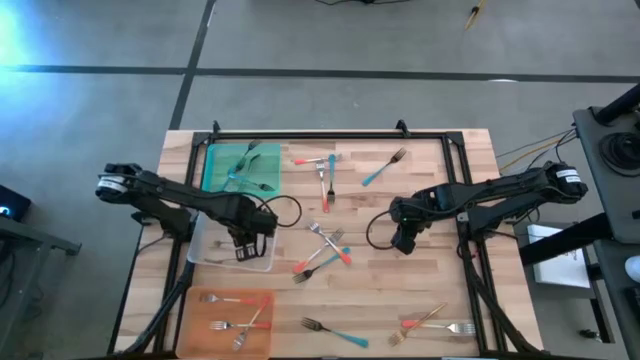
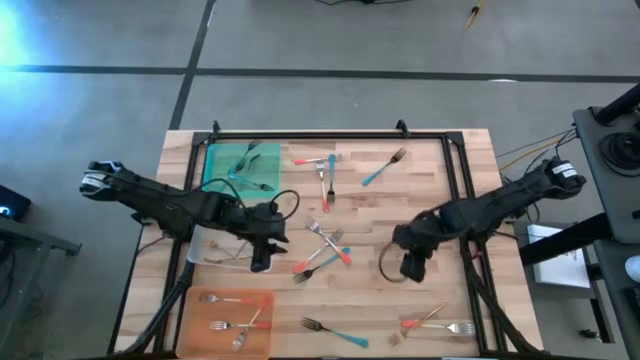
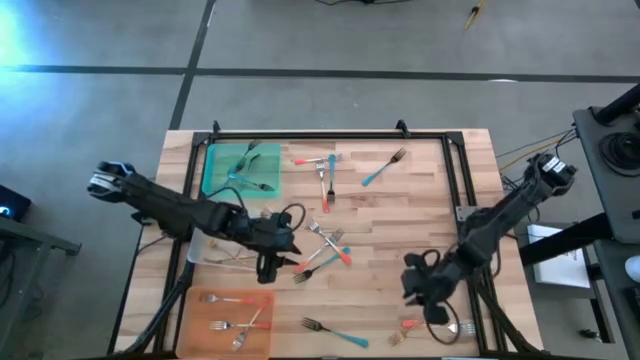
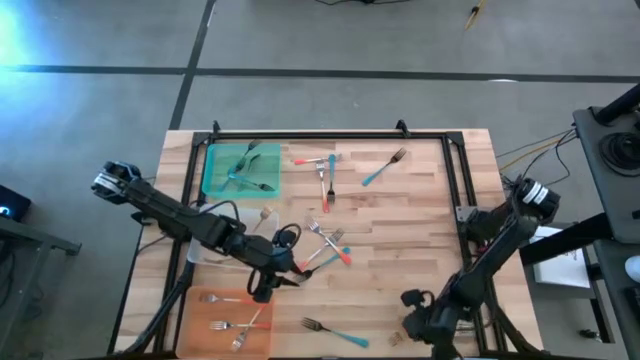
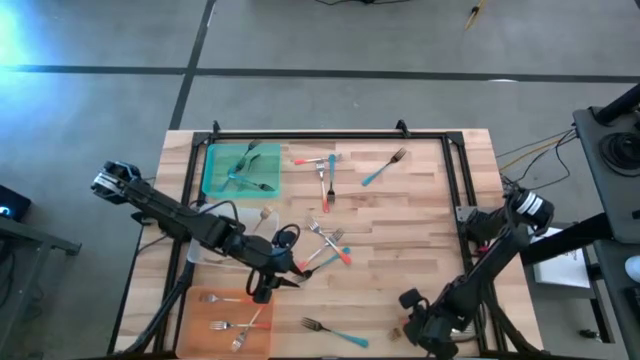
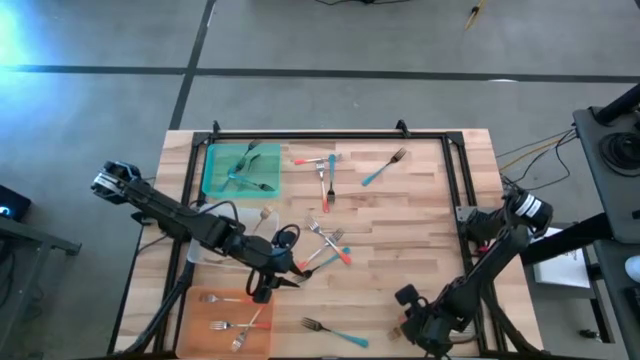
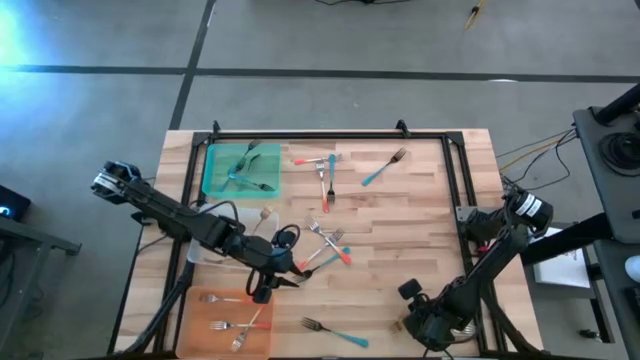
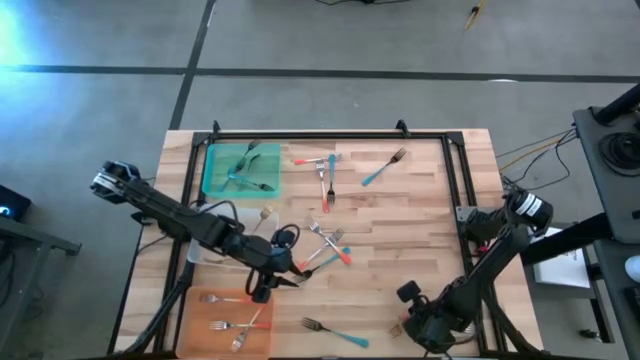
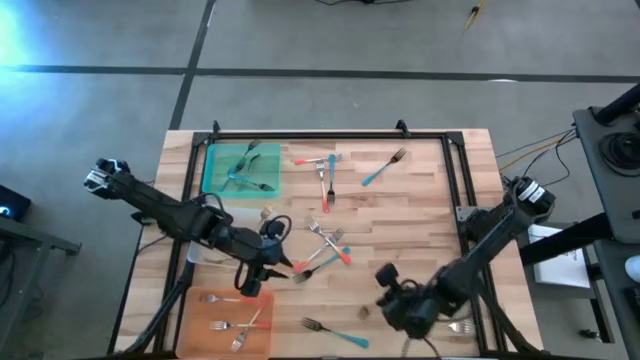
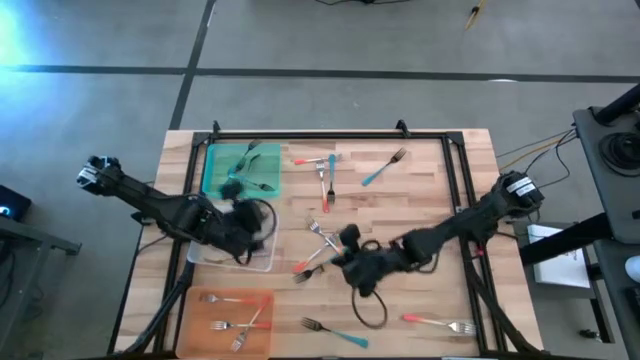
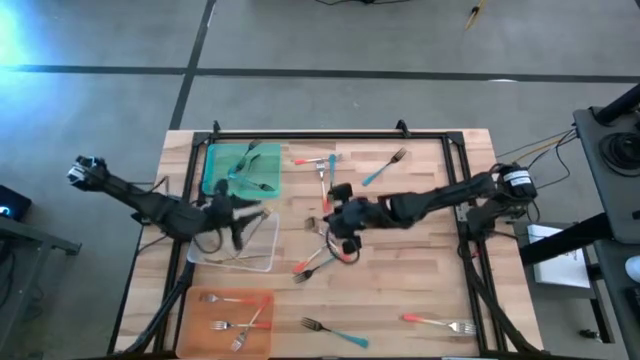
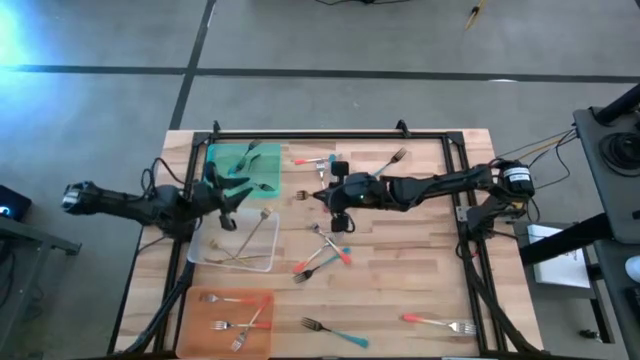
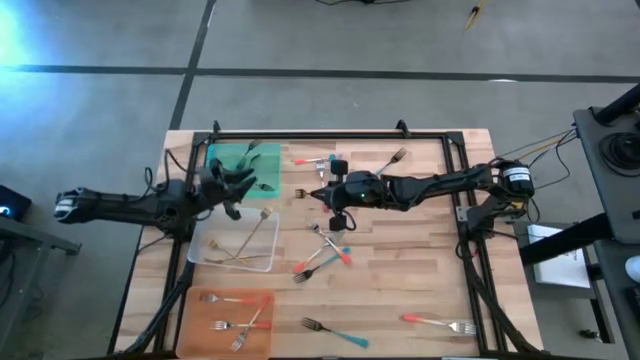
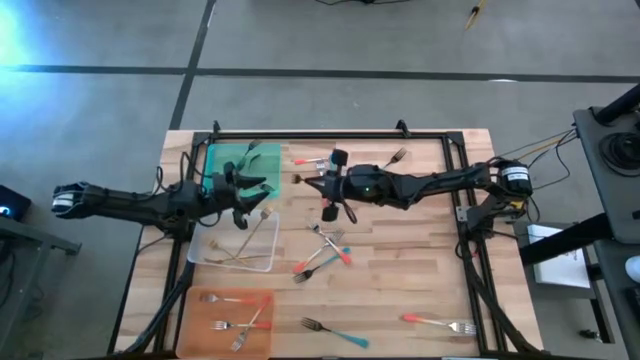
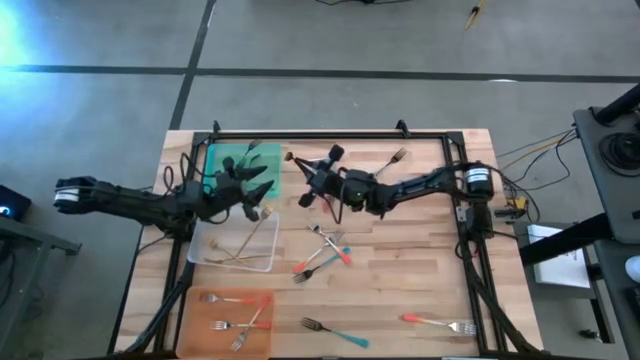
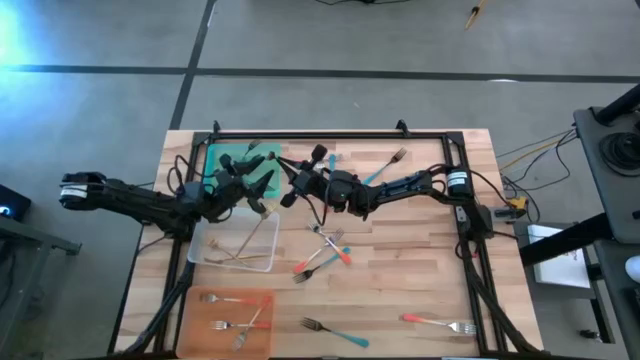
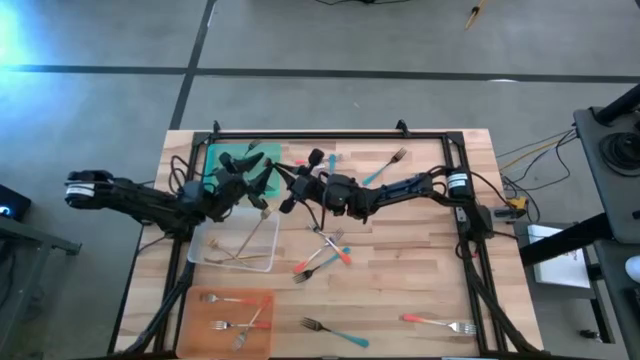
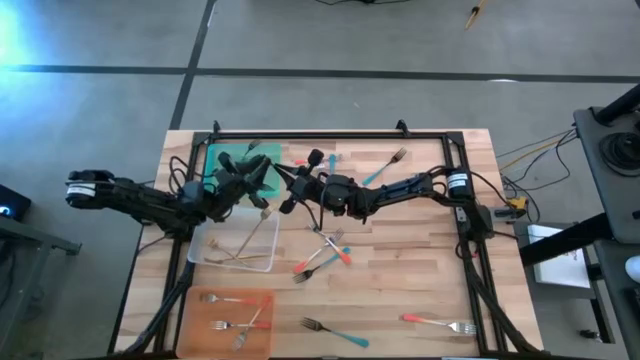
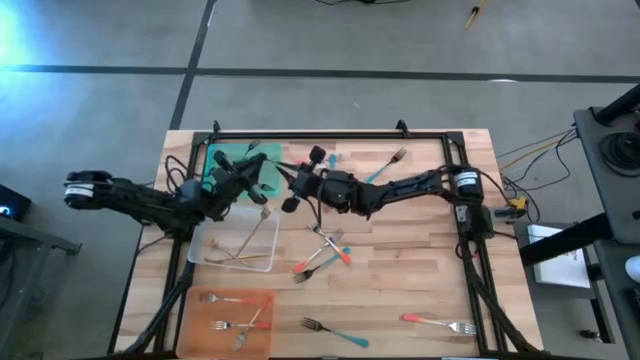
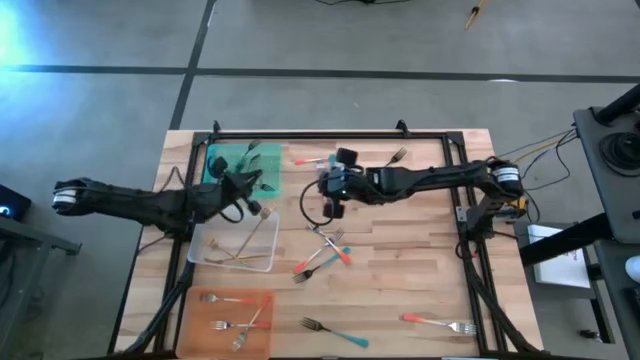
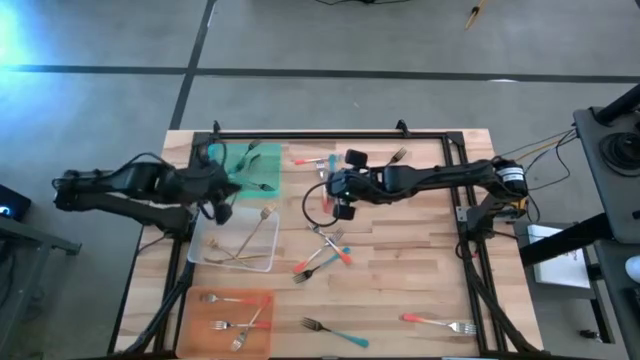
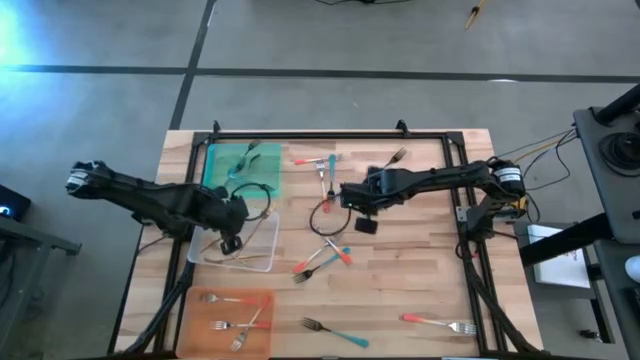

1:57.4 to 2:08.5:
Task: Sort silverware by color (type)
Put the gold fork into the transparent bin

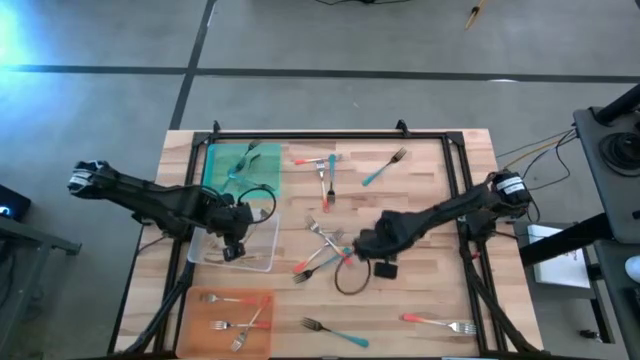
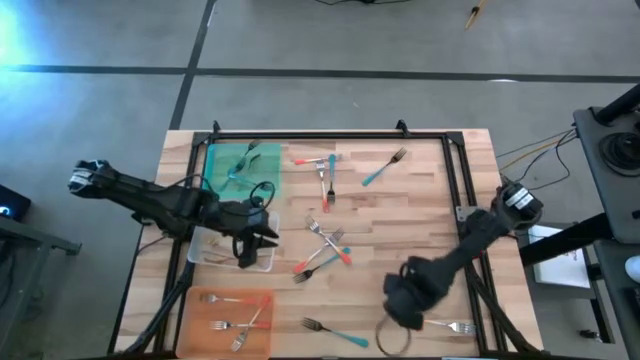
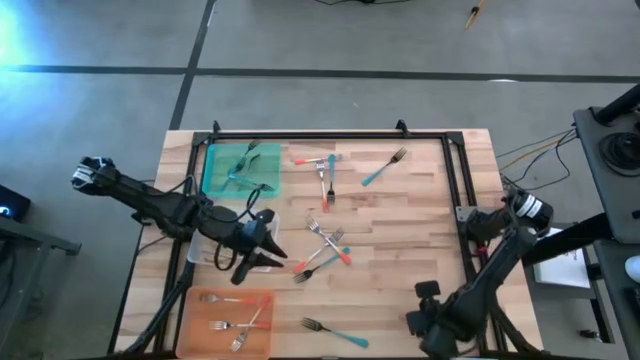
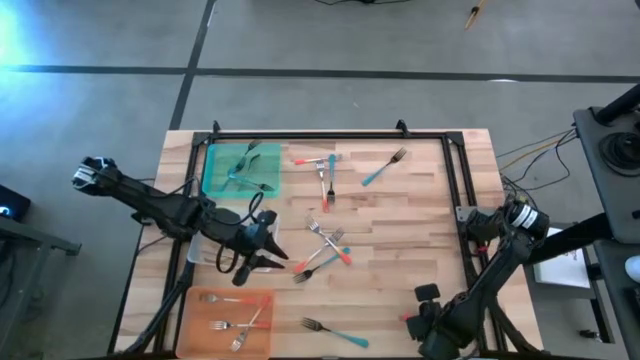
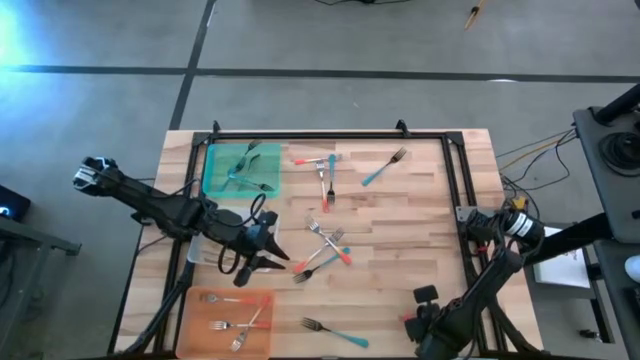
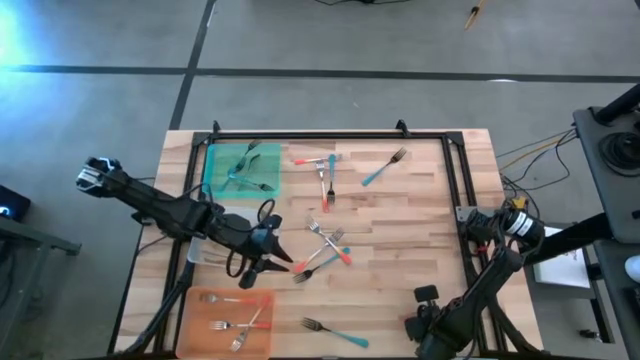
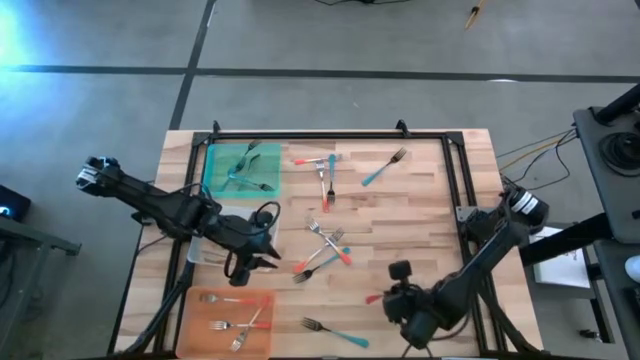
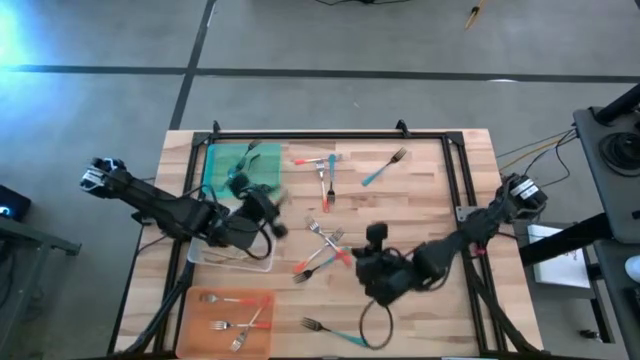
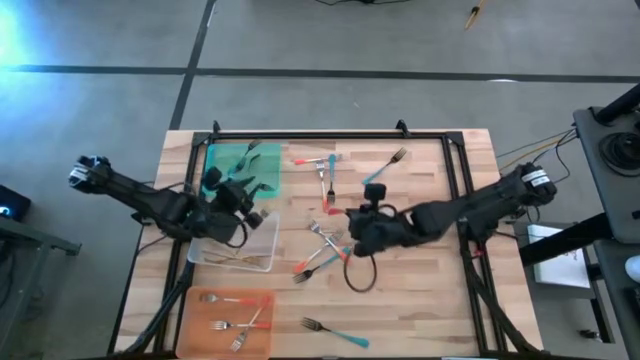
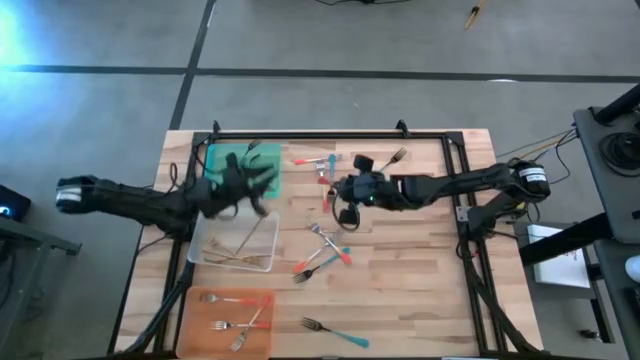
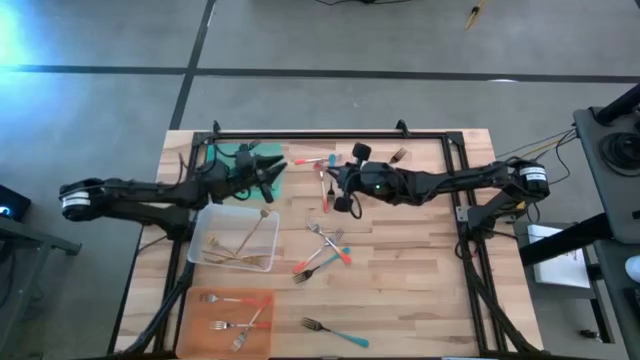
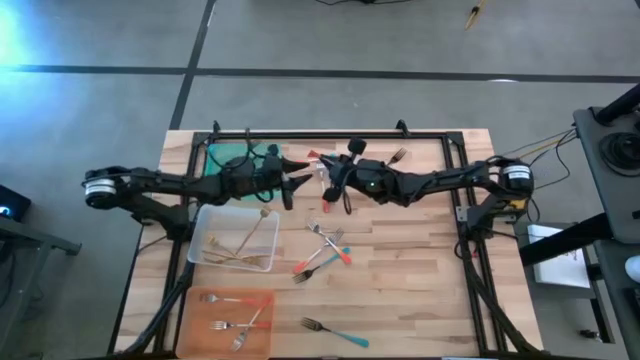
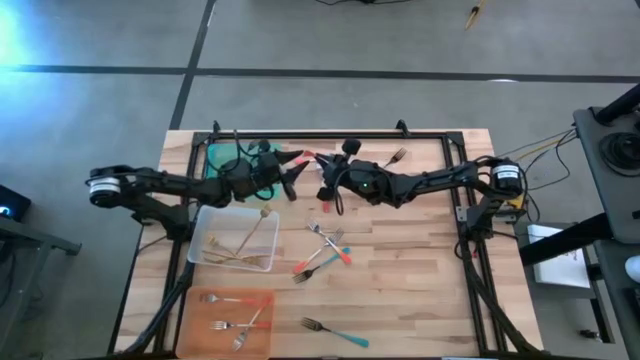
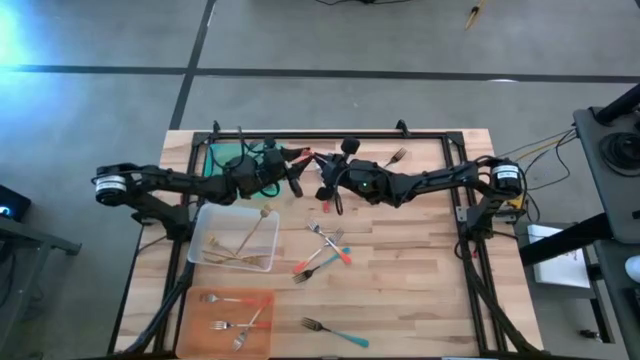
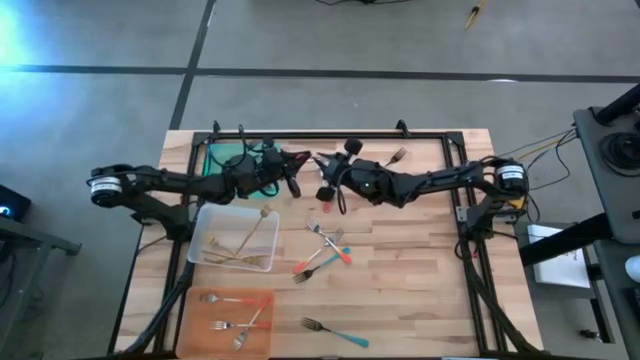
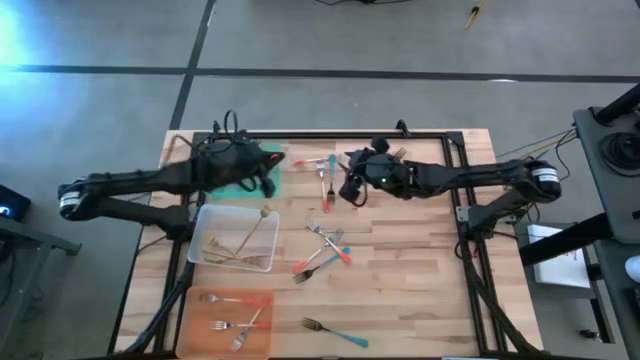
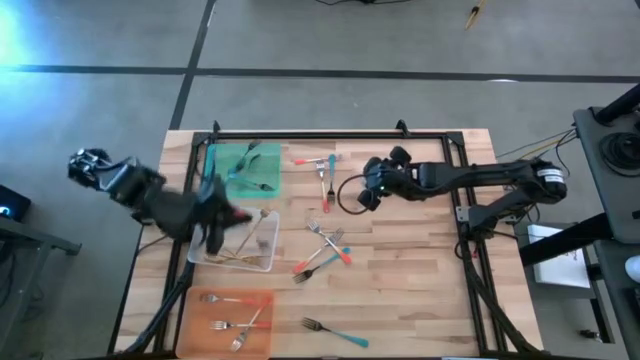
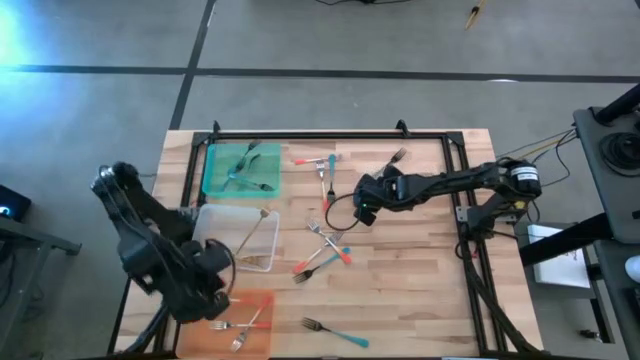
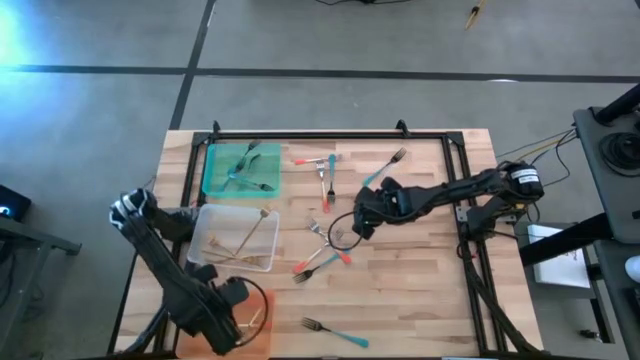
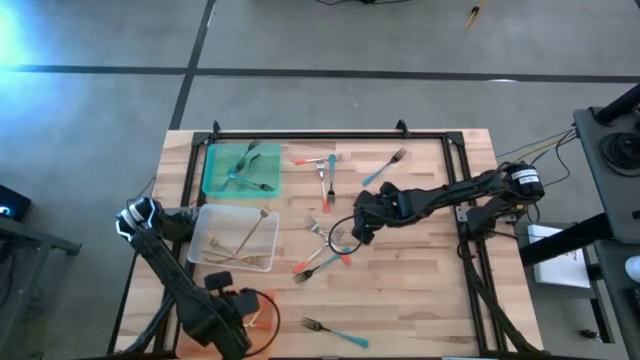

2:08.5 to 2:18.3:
Put the orange fork into the orange bin

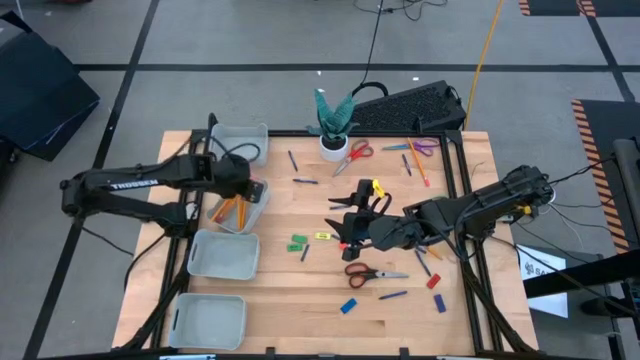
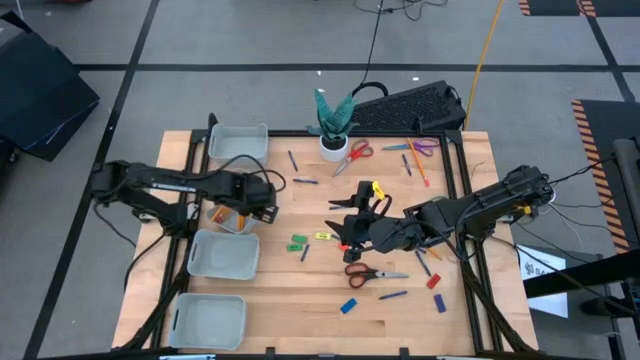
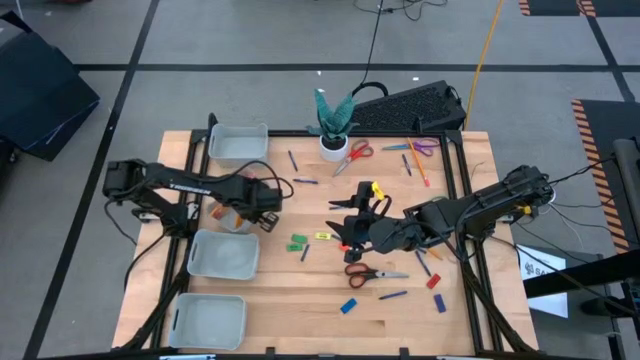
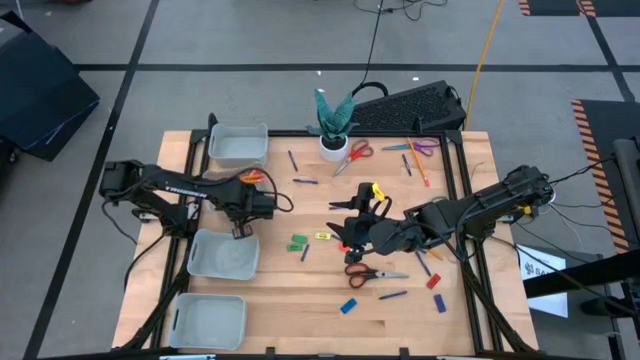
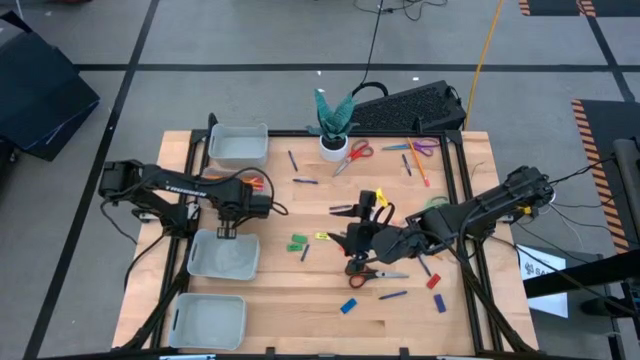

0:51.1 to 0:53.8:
Task: Sort crayons/erasers/pens/pencils in bins
Adjust the middle top gray bin
